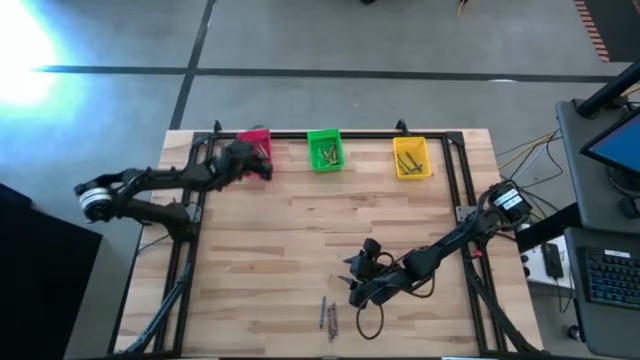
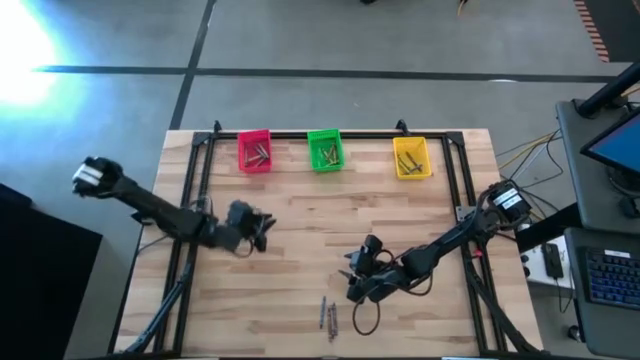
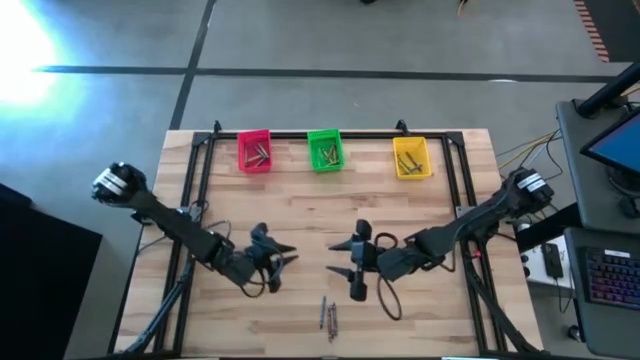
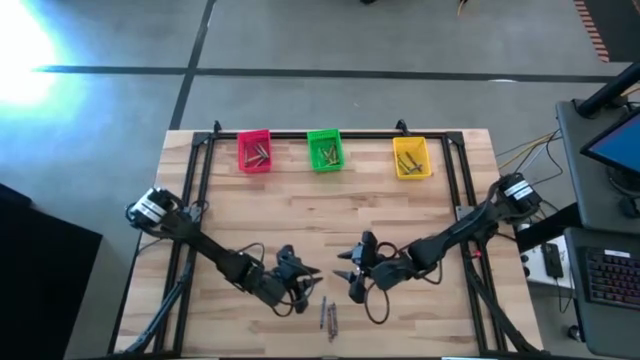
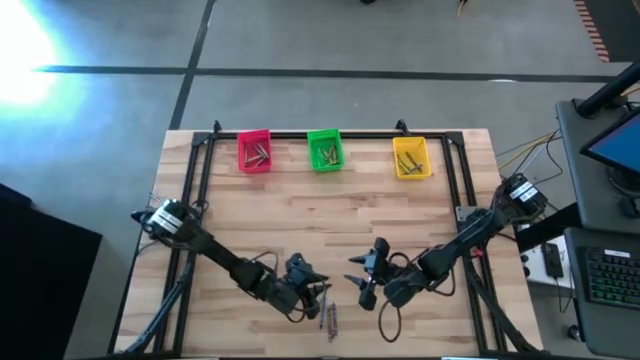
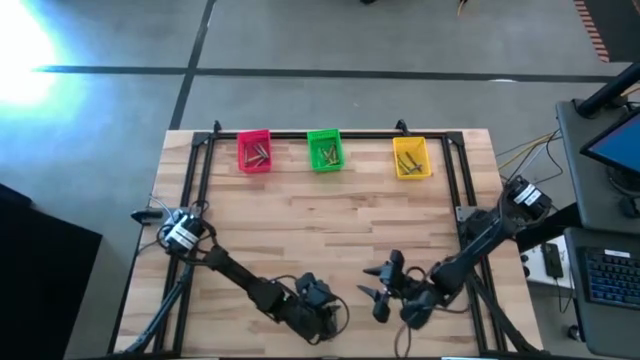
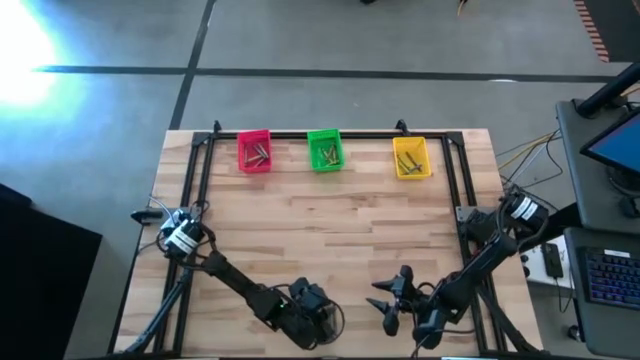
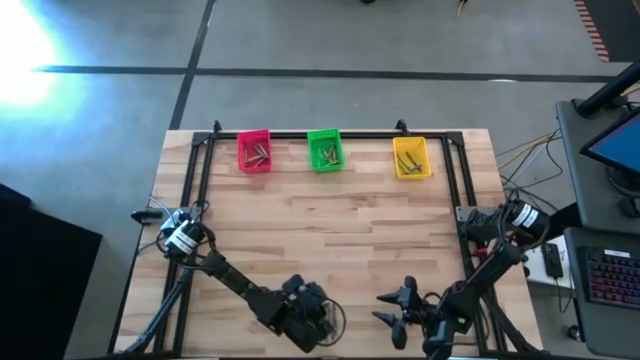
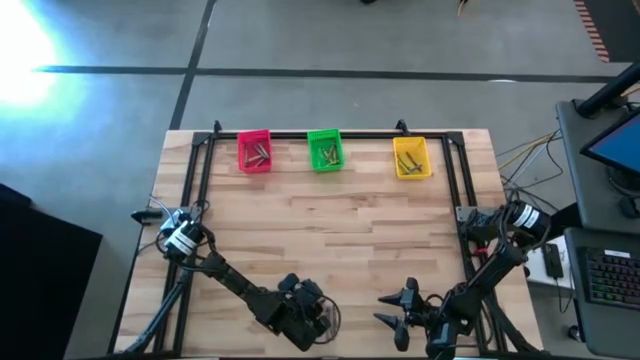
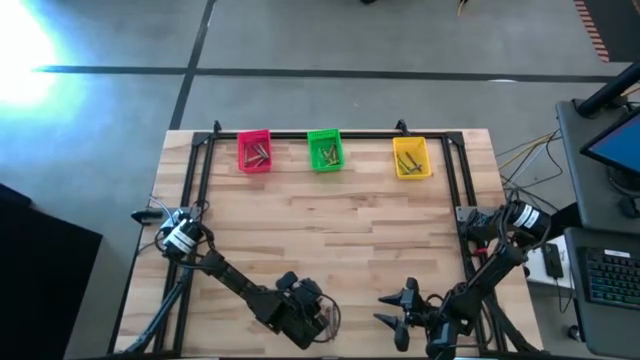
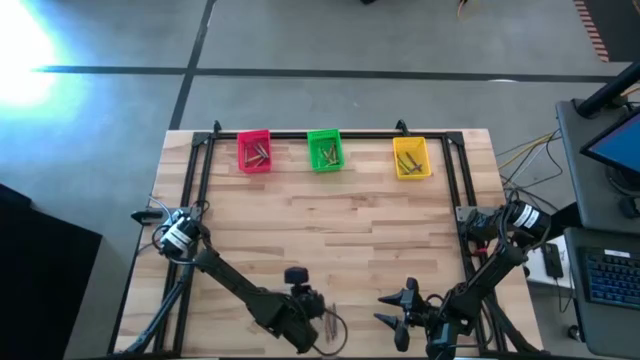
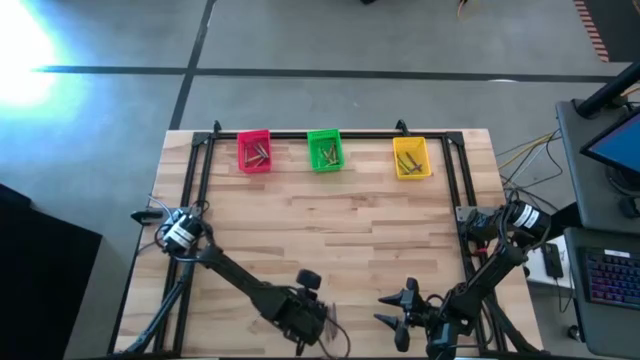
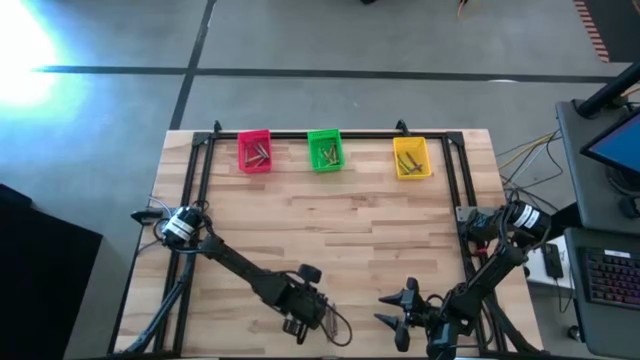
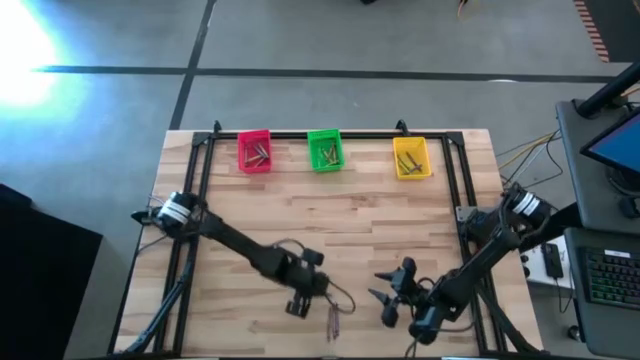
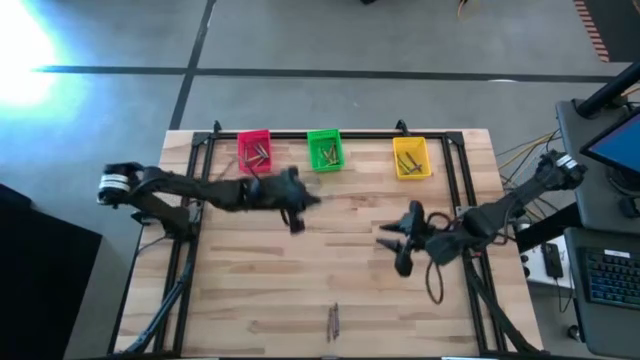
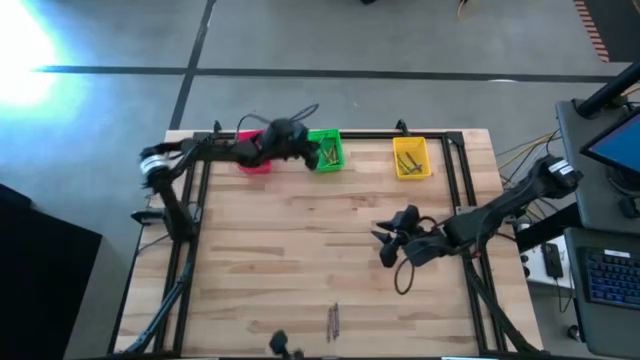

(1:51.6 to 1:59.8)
Task: Sort crayons
Put the blue crayon into the green basket

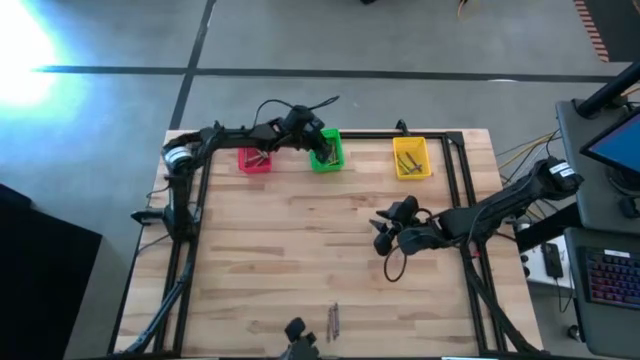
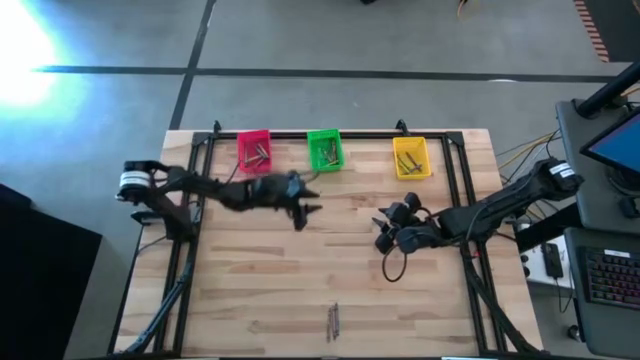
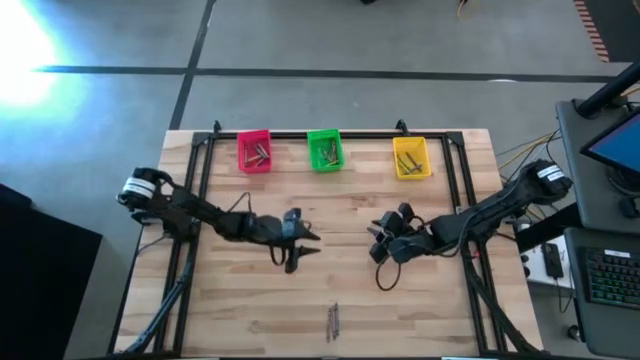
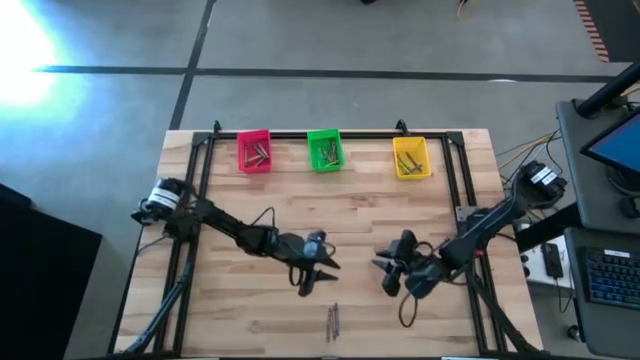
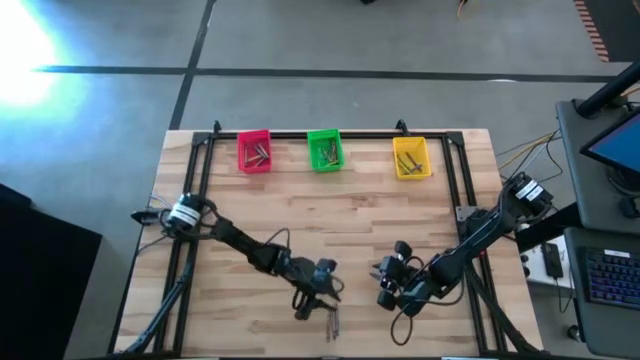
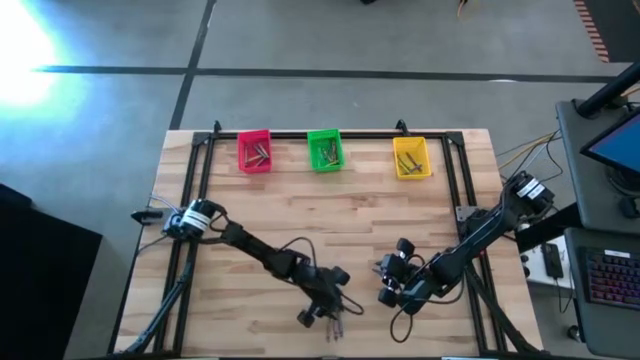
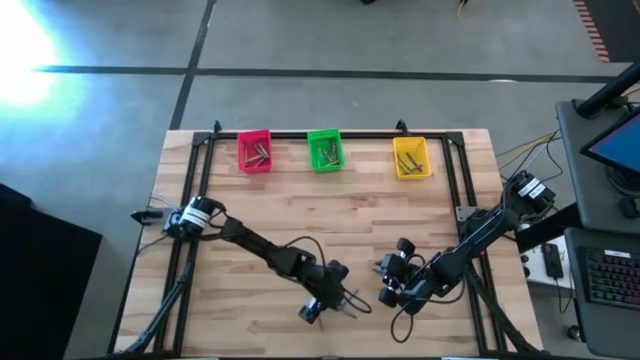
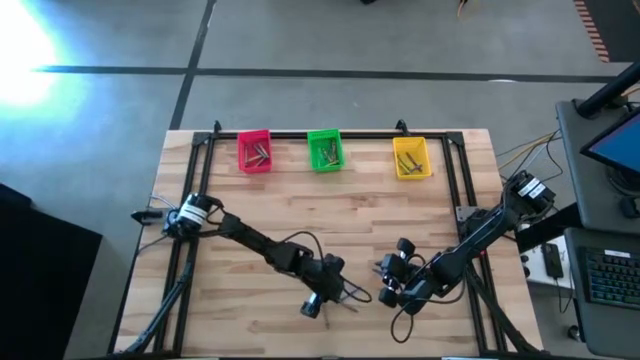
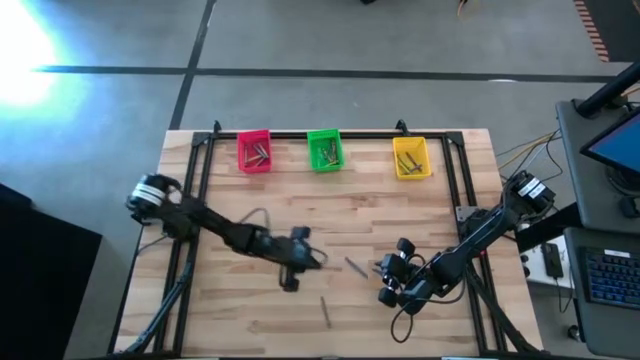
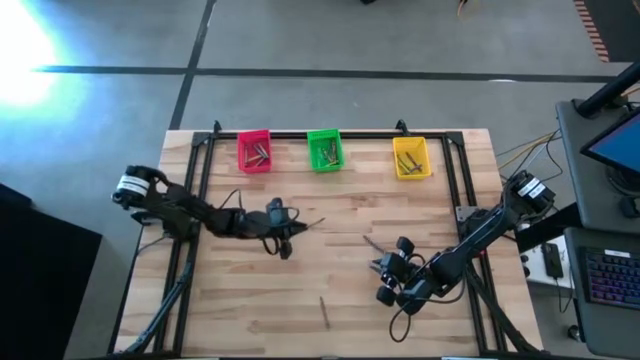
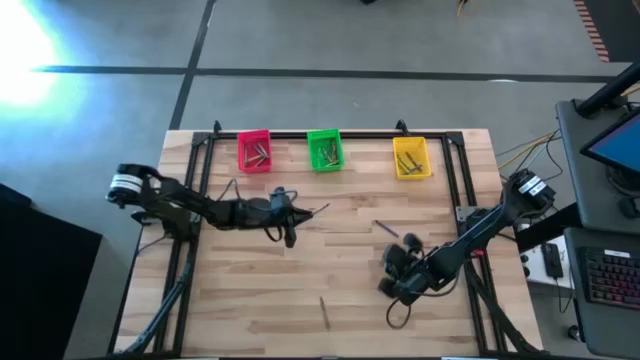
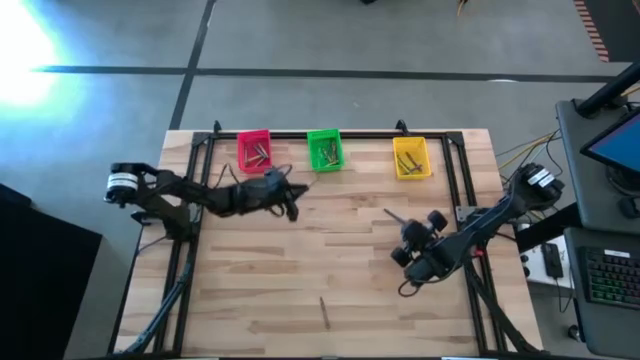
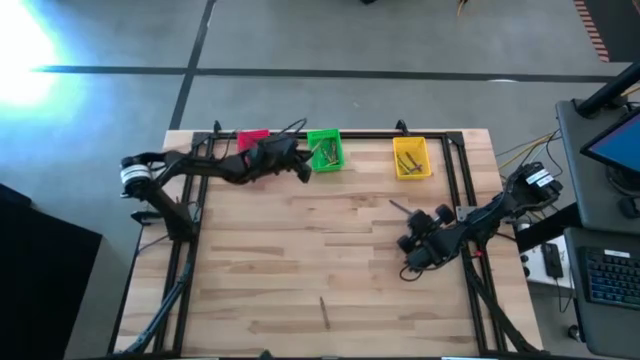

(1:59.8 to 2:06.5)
Put the brown crayon into the green basket

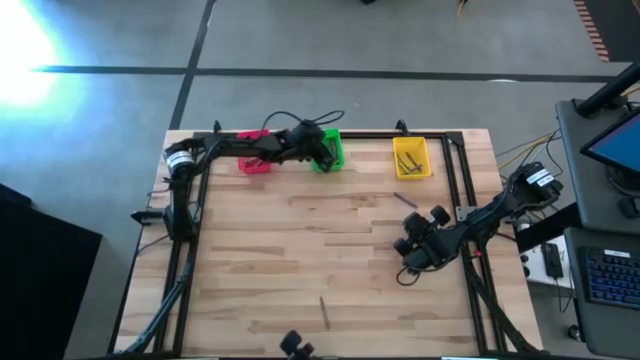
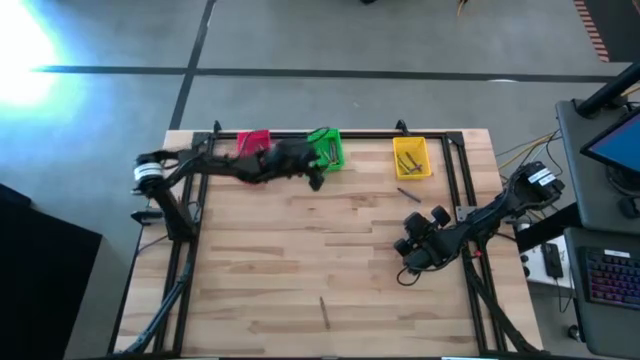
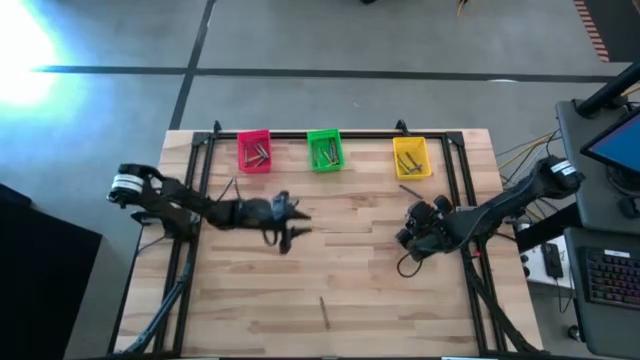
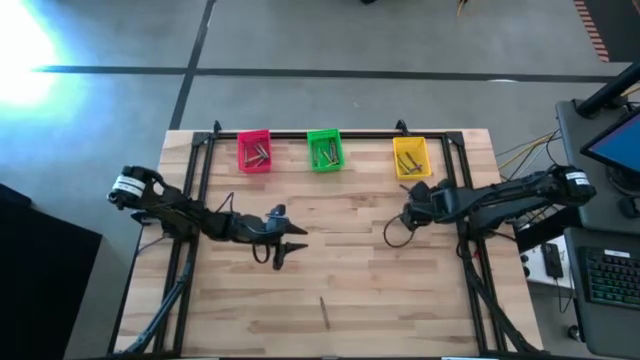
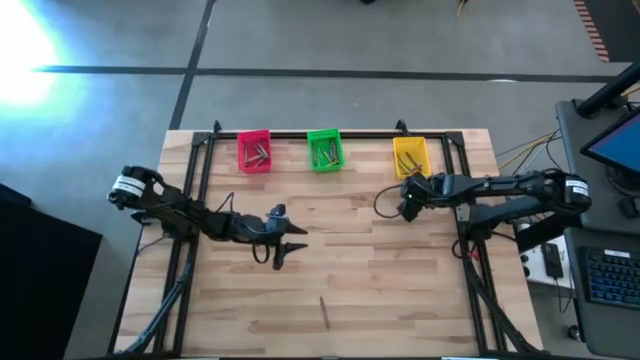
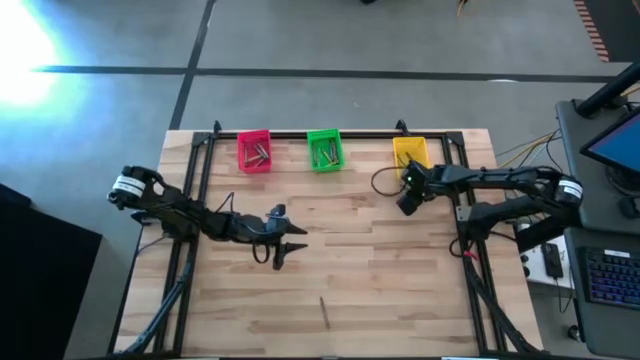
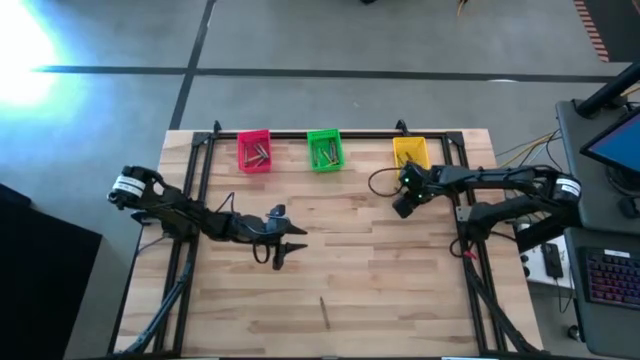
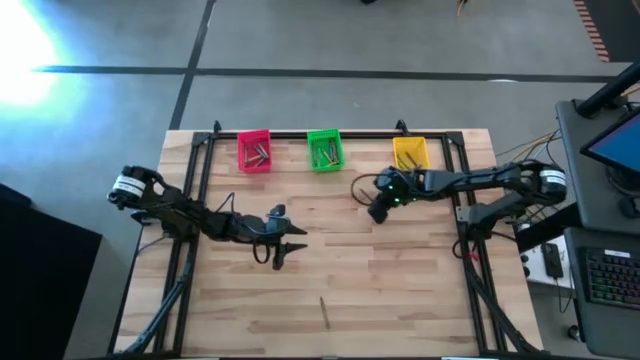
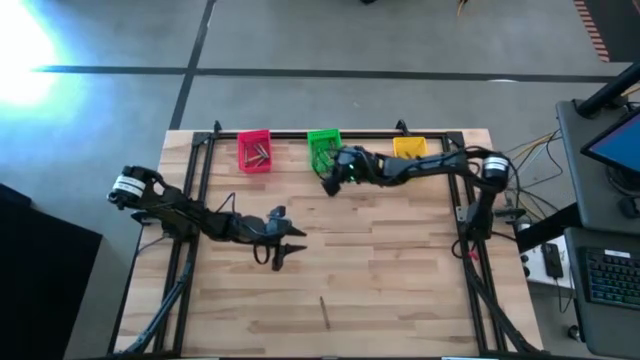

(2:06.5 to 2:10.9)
Put the blue crayon into the green basket

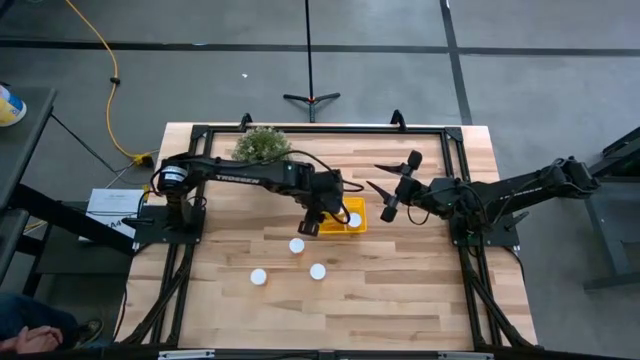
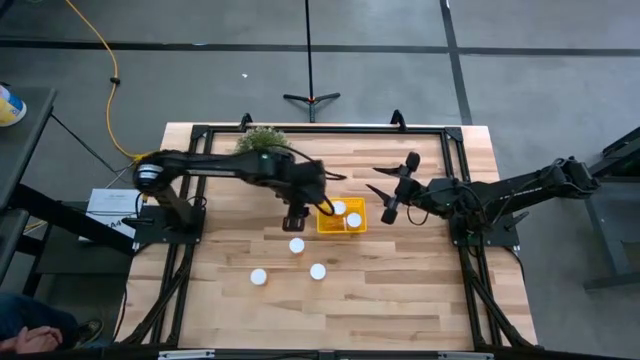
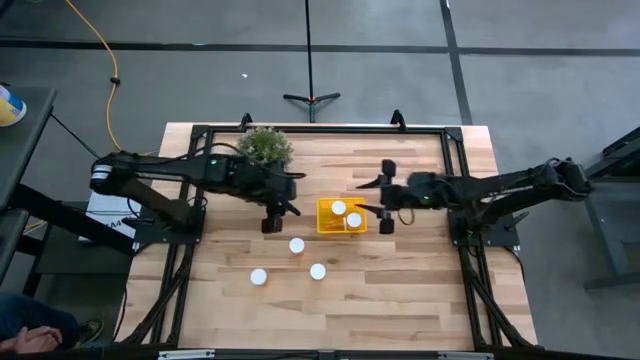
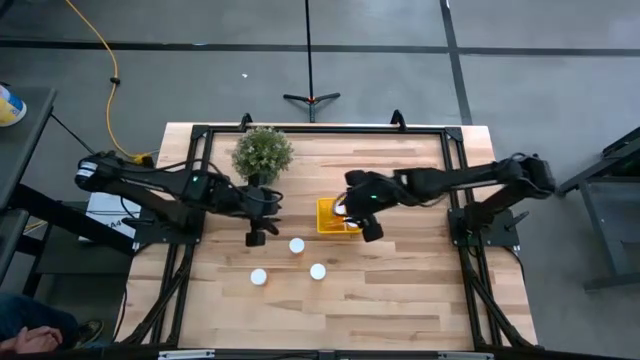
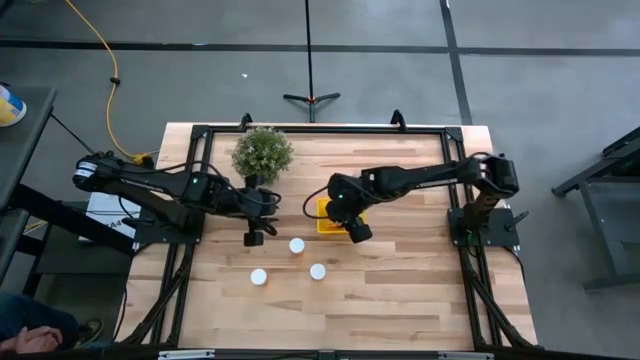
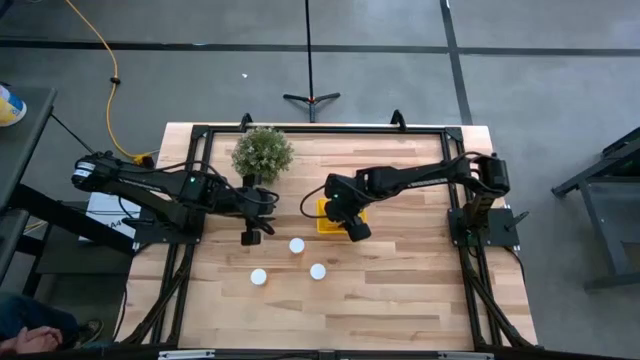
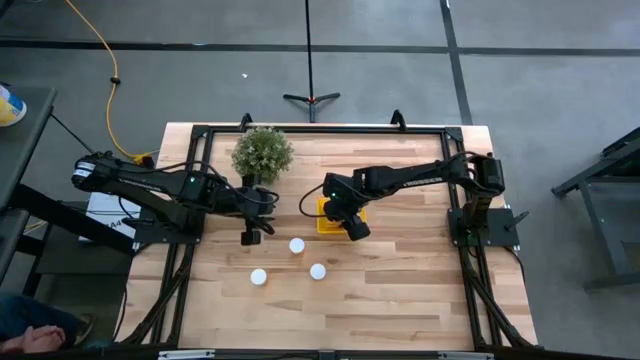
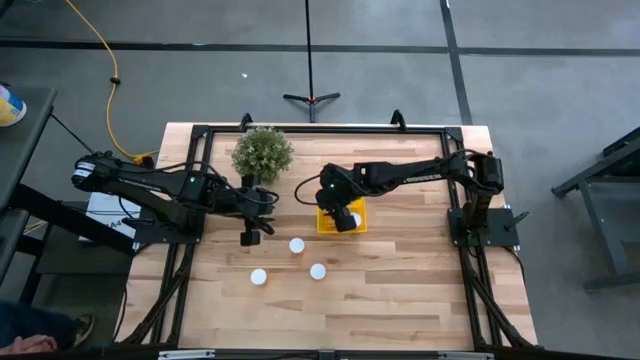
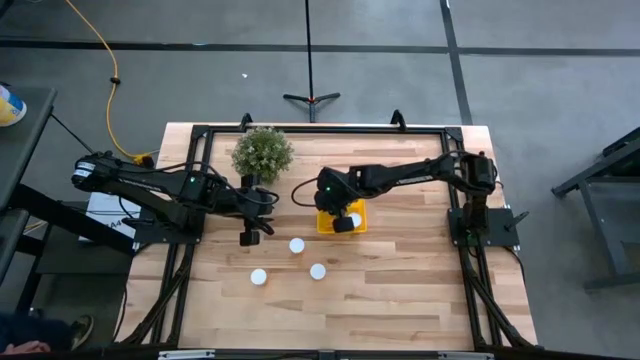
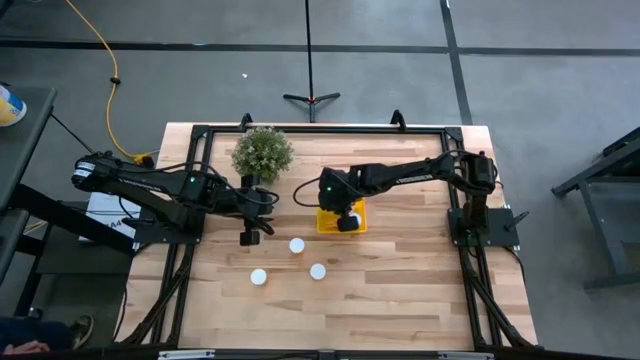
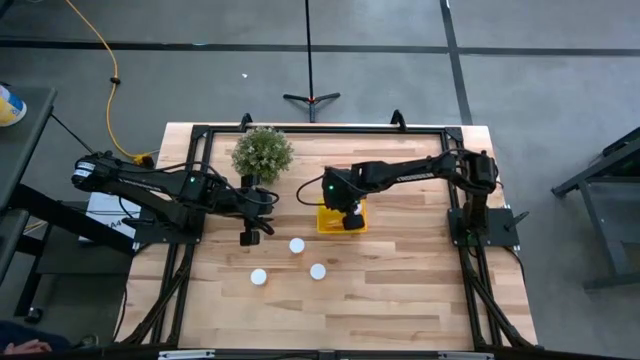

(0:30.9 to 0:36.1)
Task: Pick and place pill bottles into a basket
Adjust the orange pill bottles
